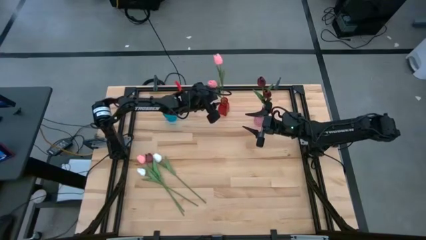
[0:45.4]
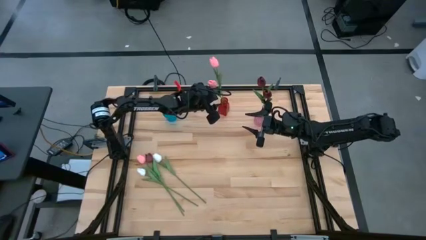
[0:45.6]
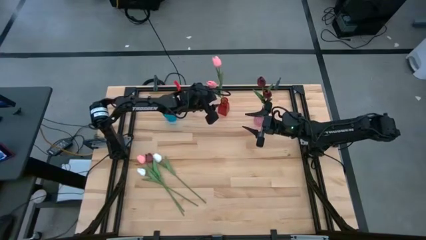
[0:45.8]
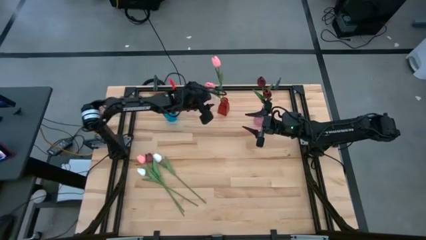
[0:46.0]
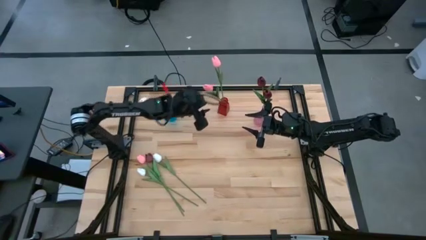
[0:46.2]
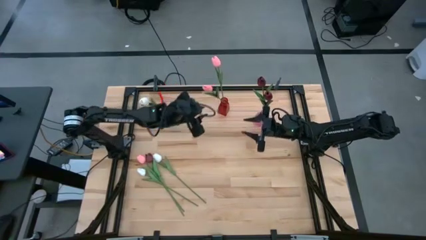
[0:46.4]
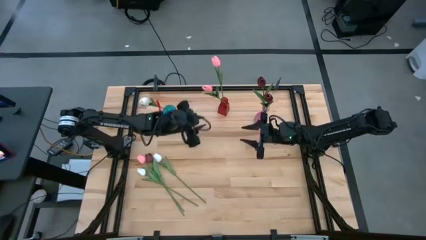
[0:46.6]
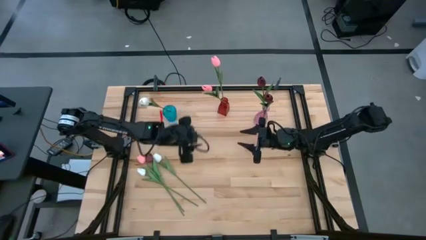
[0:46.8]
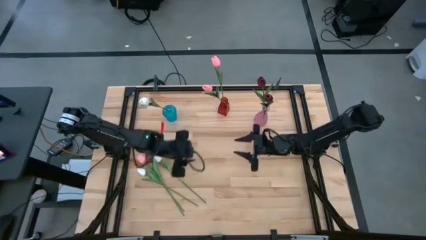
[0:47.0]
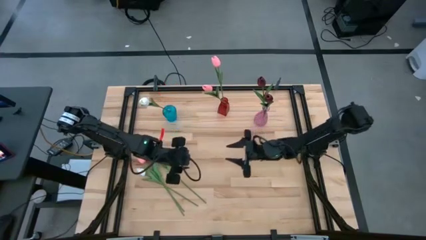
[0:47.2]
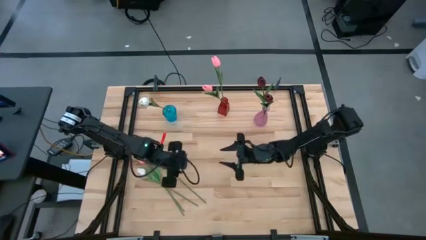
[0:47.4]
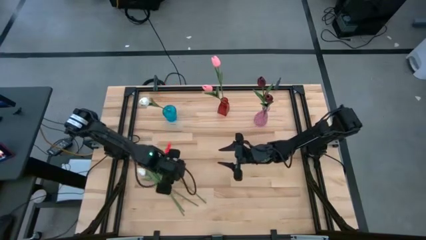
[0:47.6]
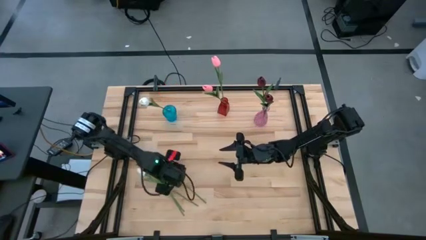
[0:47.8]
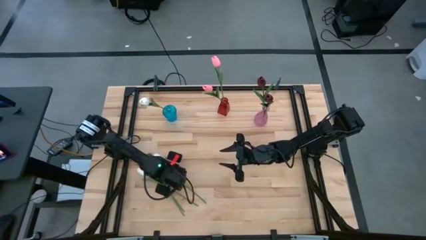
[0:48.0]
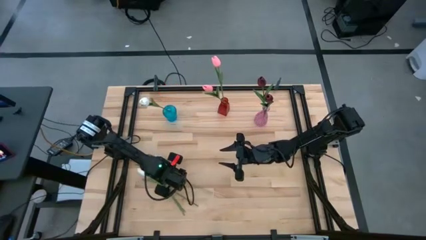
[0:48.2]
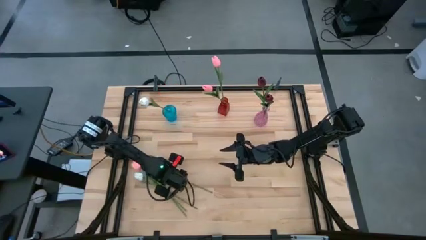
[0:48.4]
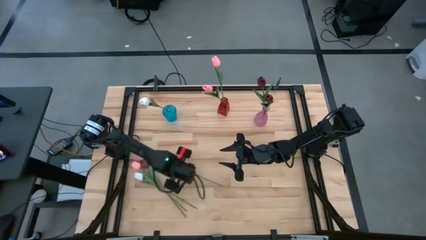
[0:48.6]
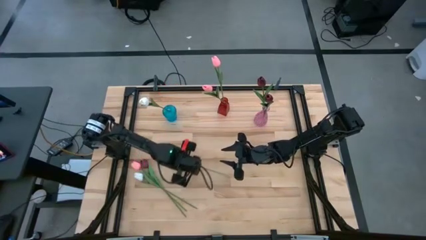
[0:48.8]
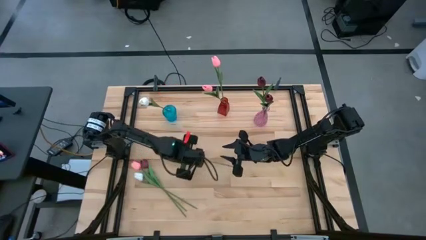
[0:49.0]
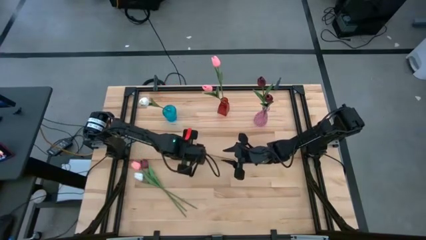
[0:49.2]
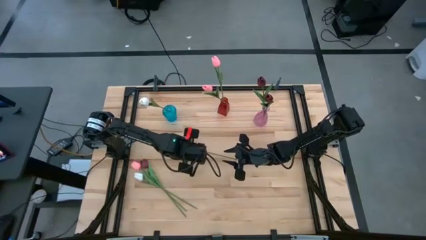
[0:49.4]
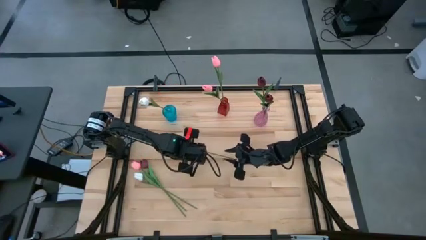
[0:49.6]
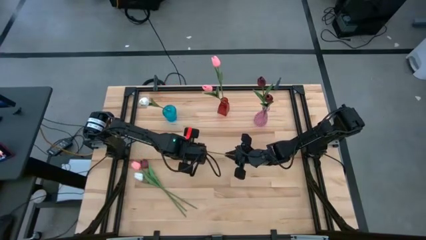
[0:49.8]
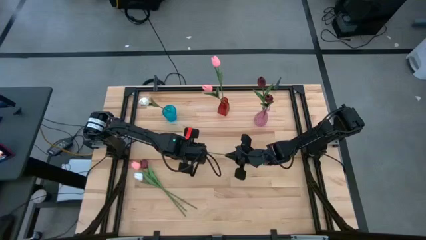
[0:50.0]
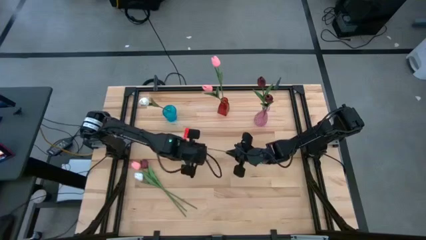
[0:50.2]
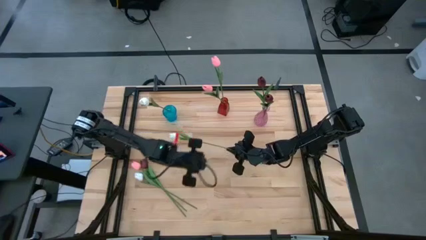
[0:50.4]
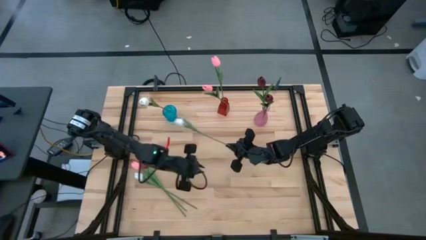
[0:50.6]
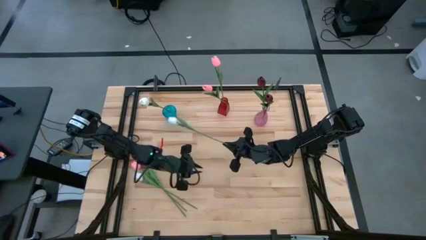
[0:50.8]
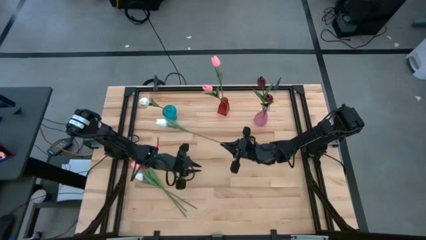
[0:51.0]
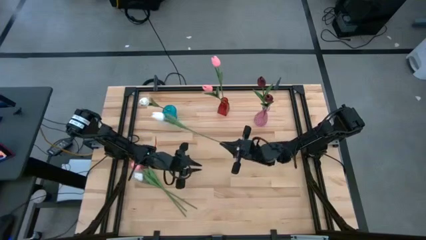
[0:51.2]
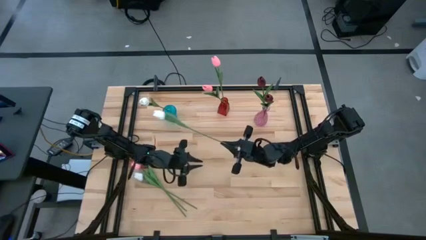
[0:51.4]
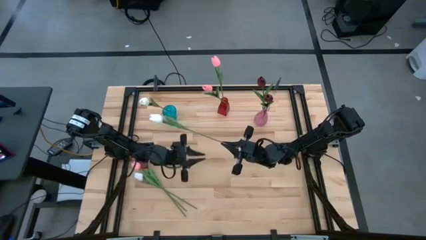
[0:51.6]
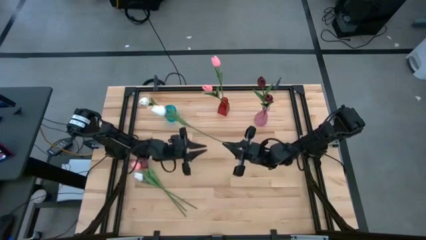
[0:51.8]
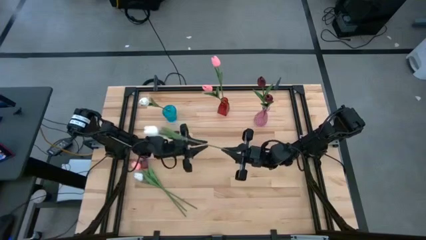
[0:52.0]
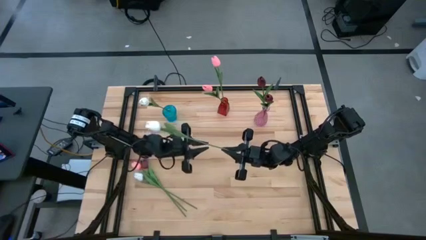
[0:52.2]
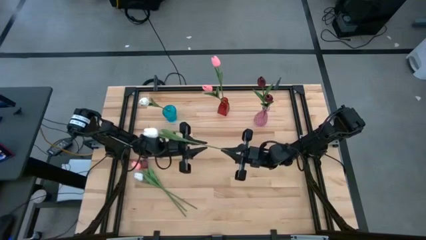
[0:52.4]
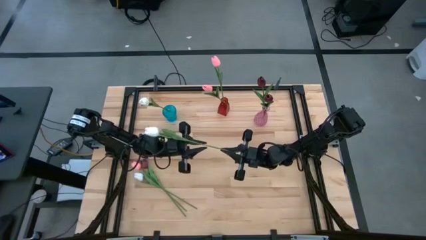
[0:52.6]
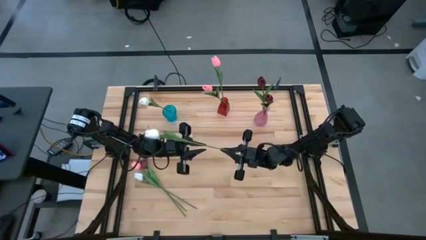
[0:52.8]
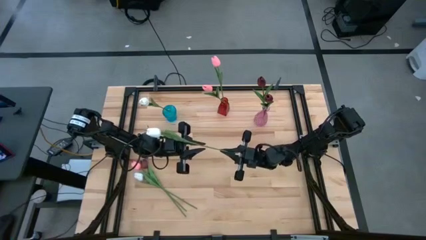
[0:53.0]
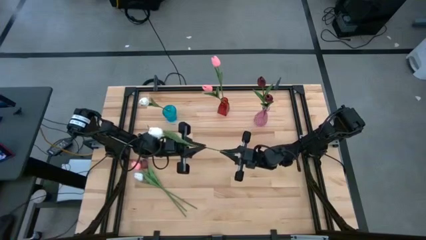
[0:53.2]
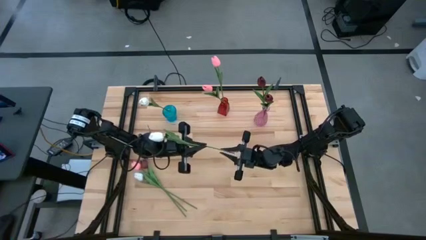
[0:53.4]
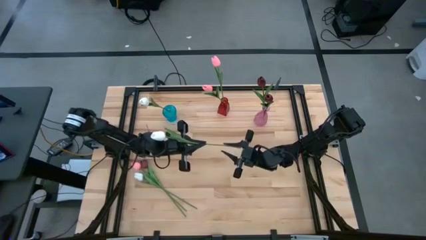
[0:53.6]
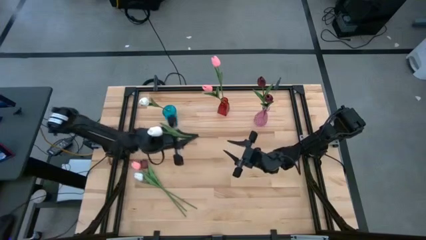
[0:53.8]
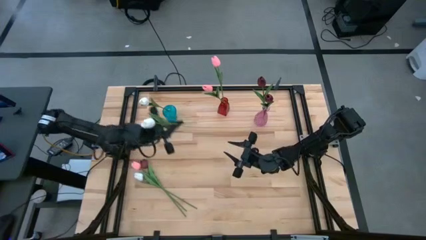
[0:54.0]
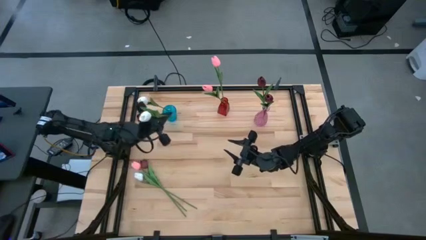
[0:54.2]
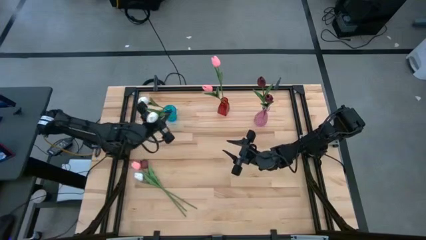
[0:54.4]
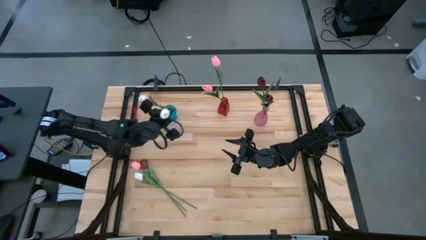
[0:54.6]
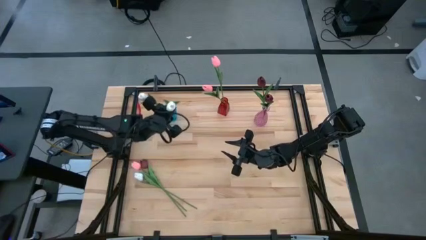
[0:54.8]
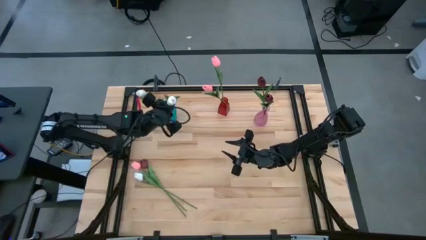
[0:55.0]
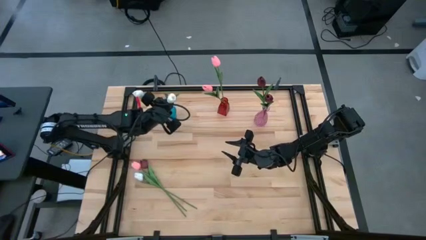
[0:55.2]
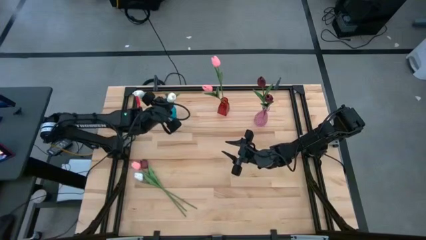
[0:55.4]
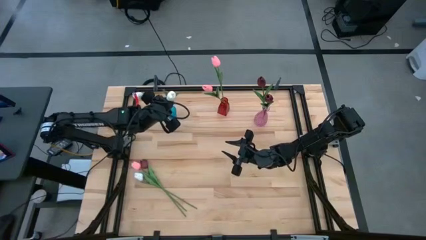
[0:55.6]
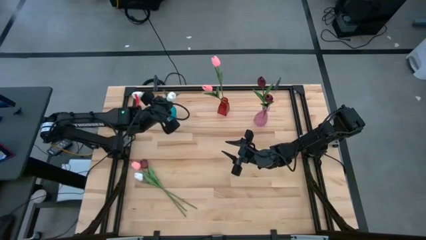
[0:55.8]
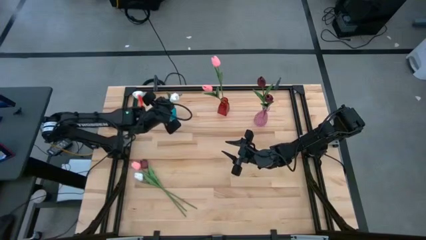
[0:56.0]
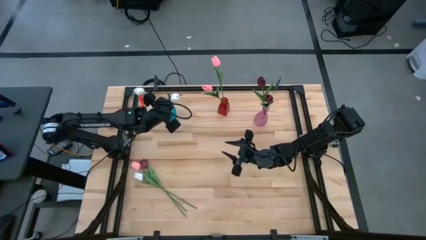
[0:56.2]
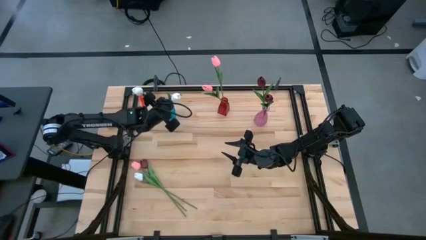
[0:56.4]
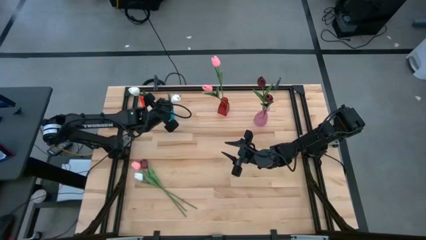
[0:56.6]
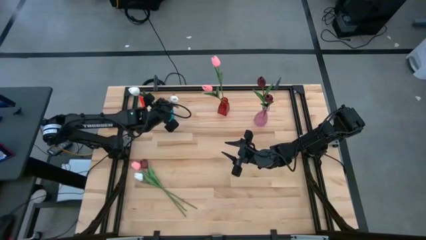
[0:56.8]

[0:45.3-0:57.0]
Task: Sort flowers into vase by color
Put the top white flower into the blue vase

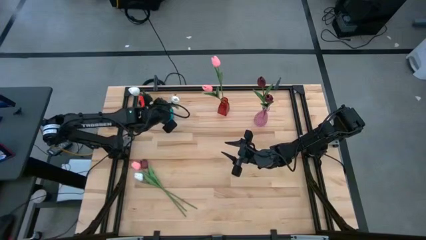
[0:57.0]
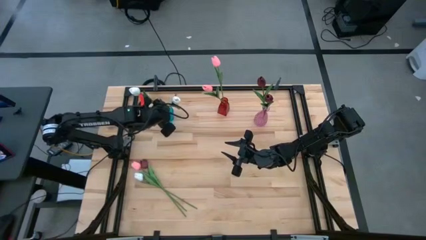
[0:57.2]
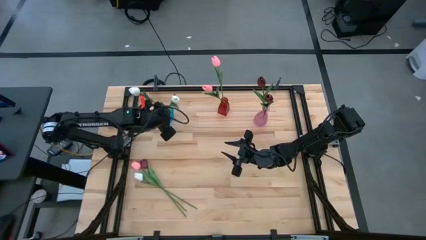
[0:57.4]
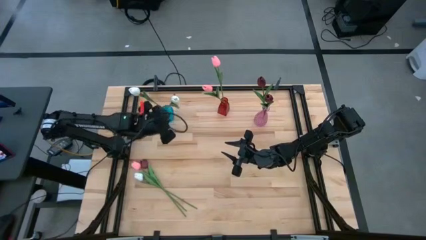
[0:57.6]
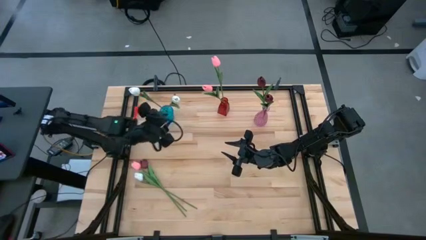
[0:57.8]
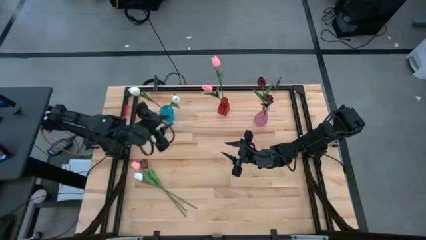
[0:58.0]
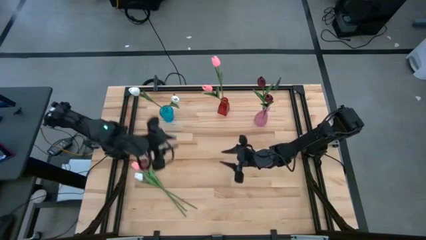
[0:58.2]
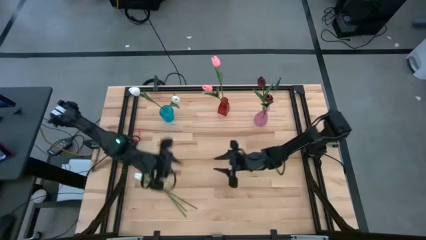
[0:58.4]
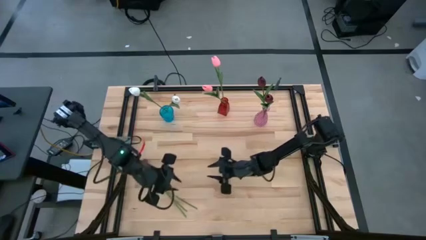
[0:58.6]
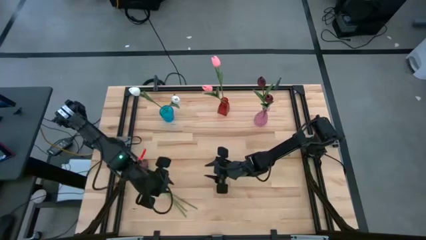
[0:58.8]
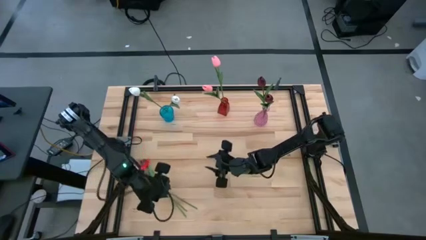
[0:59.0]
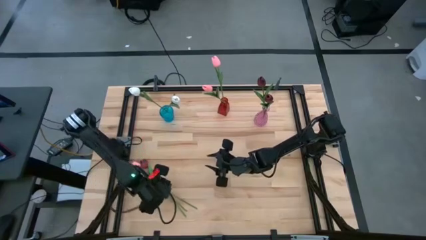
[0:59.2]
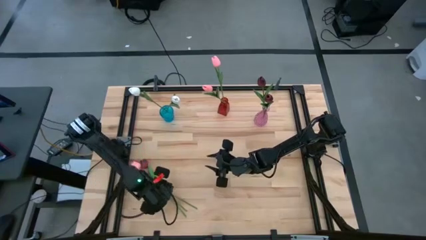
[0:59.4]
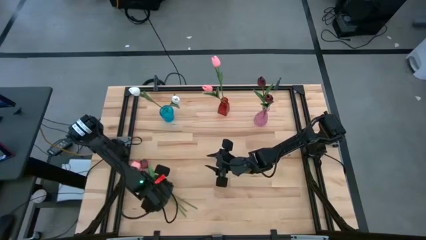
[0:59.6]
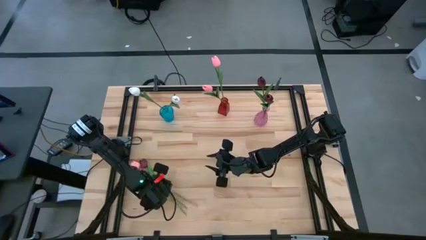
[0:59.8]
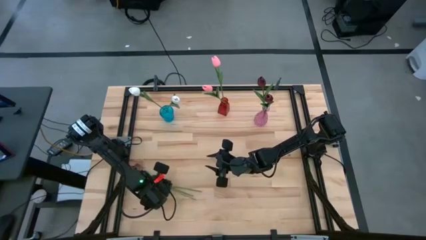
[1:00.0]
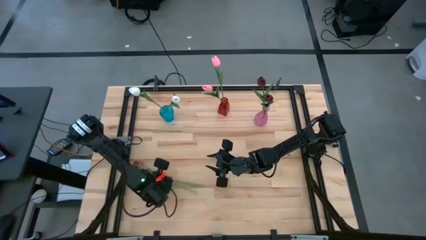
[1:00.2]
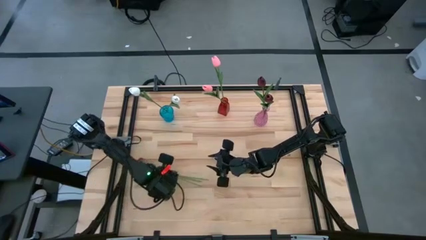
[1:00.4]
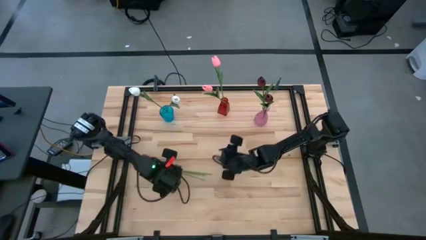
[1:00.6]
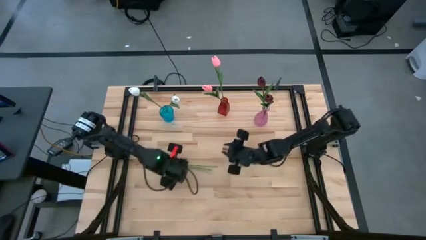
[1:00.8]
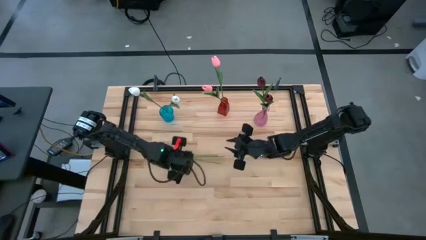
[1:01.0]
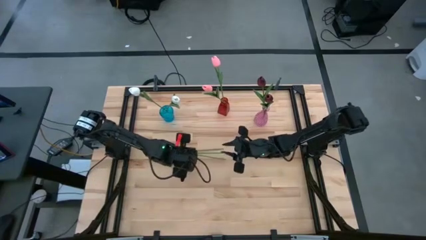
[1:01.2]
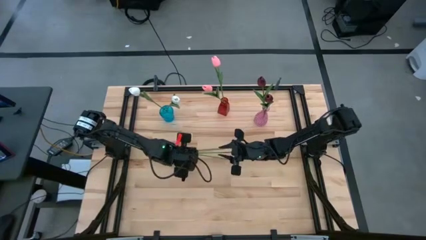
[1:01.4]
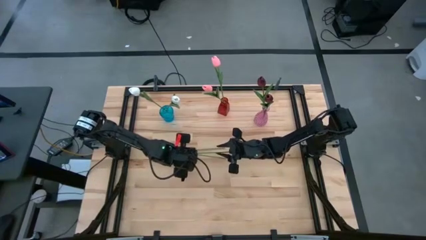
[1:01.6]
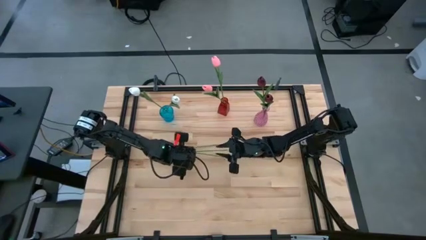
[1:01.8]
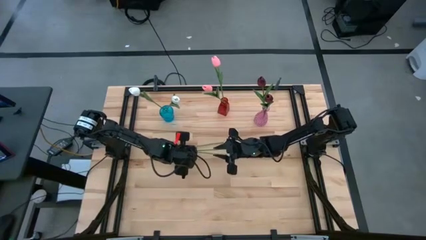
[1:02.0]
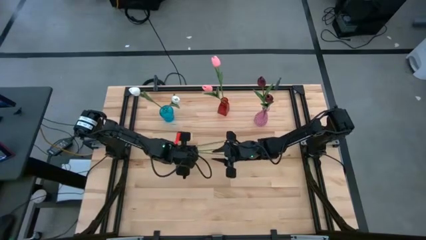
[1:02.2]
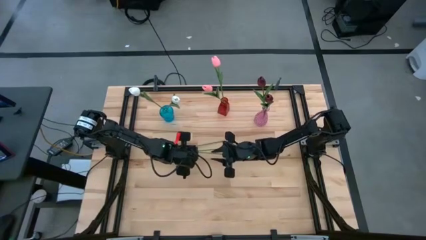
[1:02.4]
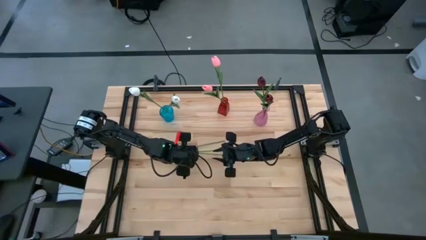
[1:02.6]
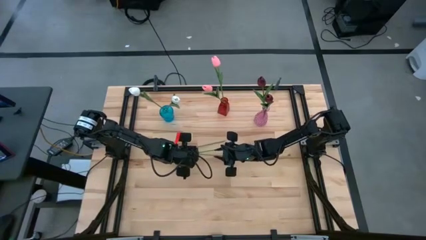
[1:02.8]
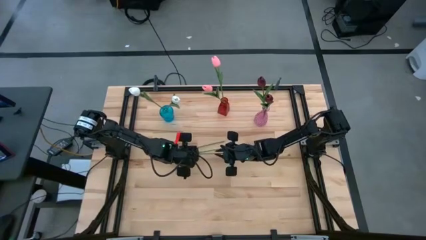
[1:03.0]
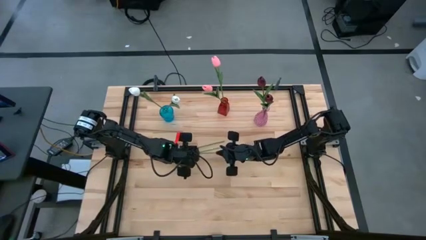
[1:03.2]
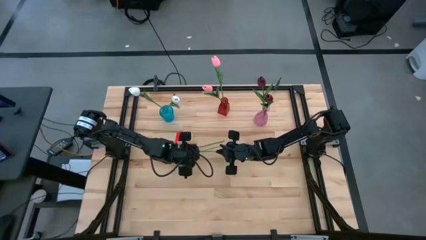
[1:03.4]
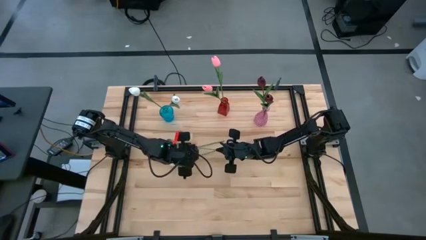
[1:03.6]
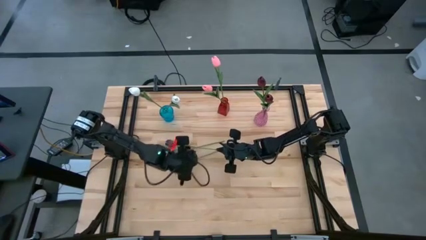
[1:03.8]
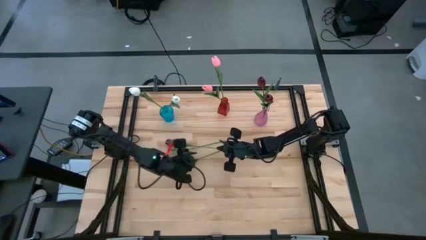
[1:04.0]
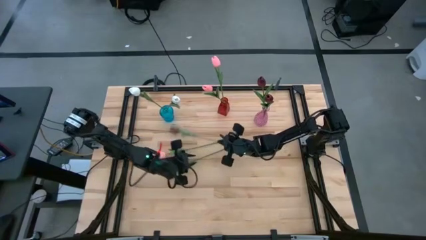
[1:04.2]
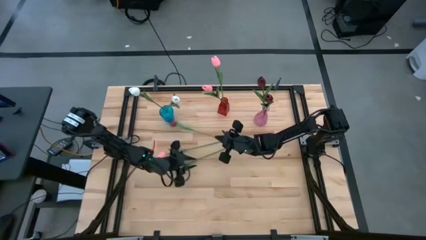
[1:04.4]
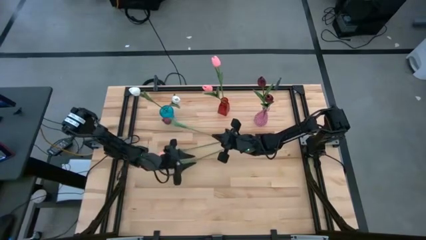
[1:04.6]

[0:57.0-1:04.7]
Put the red flower into the pink vase
